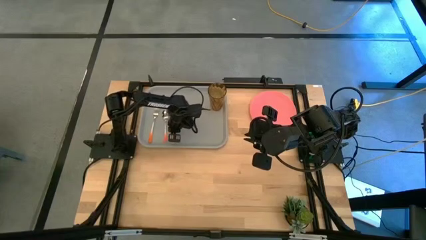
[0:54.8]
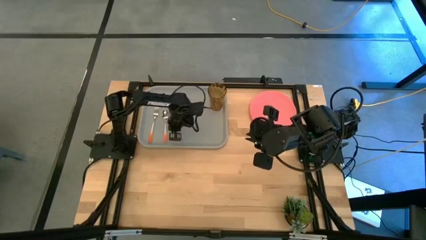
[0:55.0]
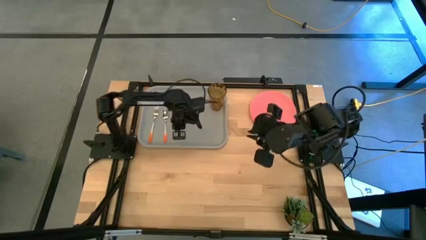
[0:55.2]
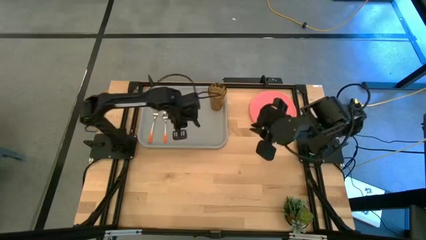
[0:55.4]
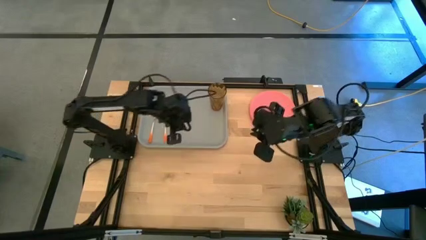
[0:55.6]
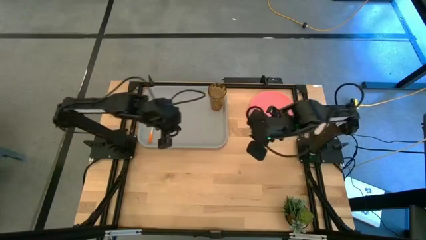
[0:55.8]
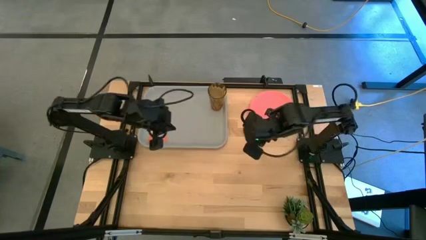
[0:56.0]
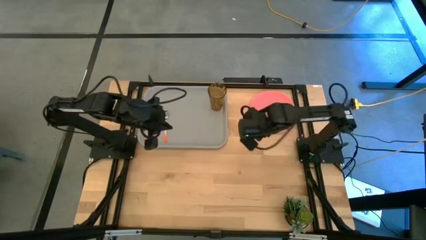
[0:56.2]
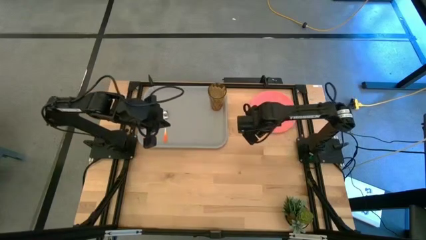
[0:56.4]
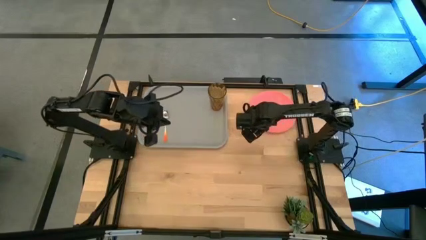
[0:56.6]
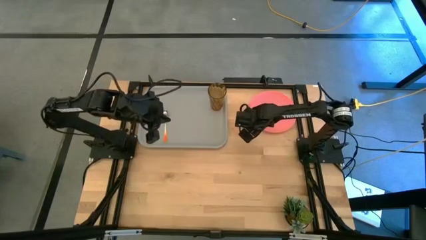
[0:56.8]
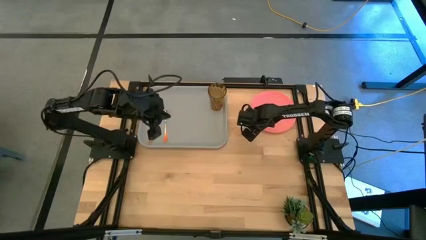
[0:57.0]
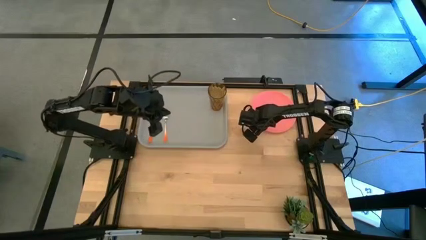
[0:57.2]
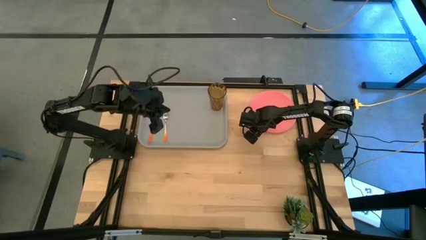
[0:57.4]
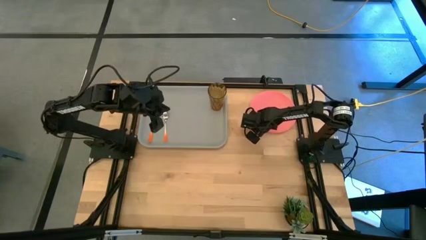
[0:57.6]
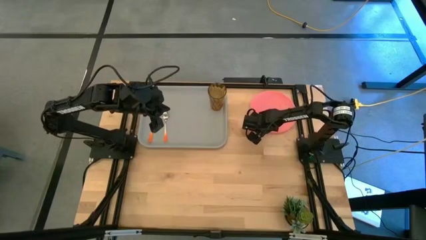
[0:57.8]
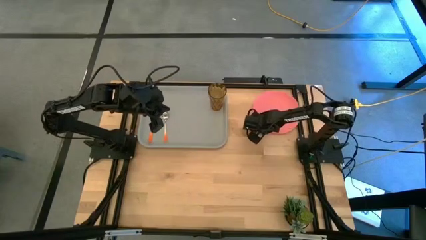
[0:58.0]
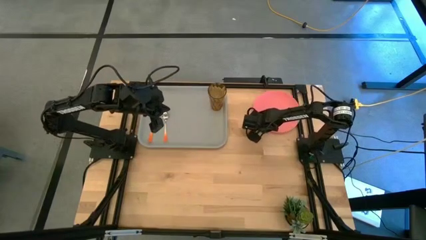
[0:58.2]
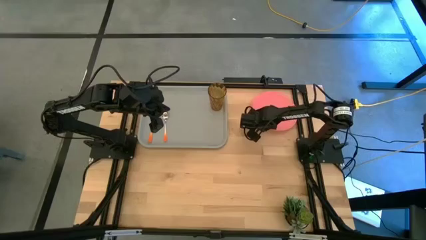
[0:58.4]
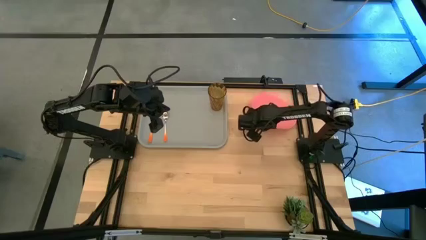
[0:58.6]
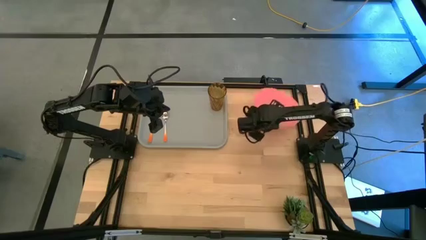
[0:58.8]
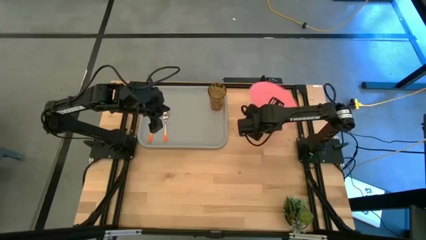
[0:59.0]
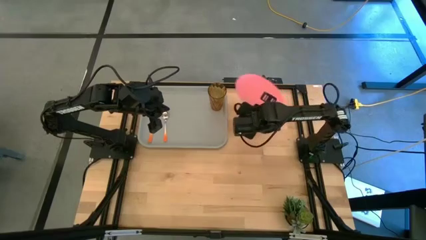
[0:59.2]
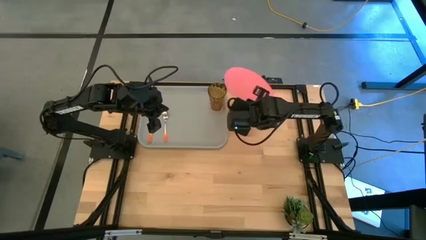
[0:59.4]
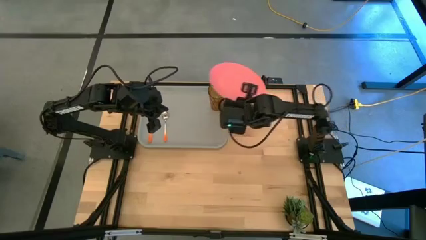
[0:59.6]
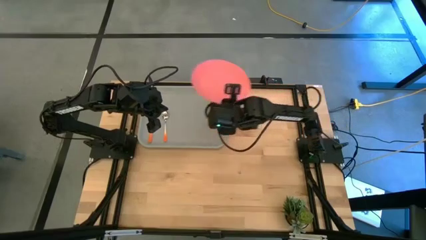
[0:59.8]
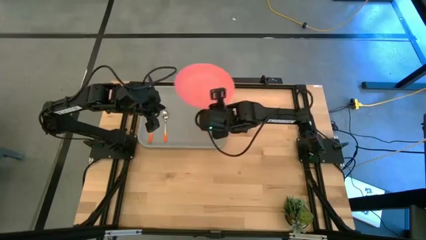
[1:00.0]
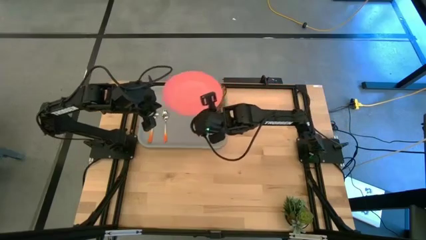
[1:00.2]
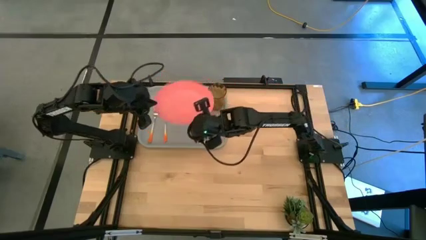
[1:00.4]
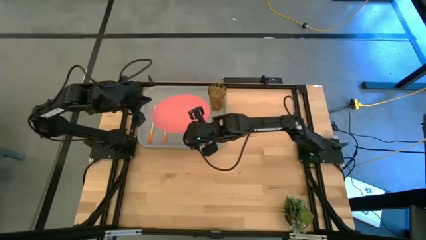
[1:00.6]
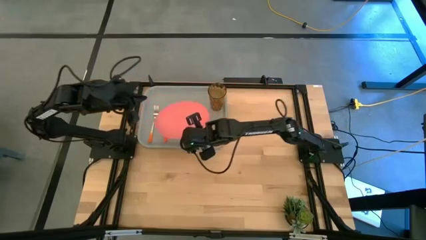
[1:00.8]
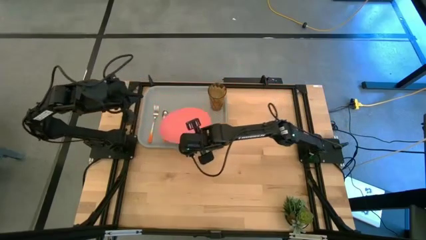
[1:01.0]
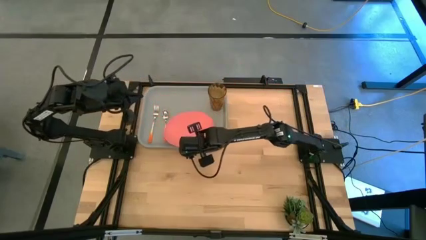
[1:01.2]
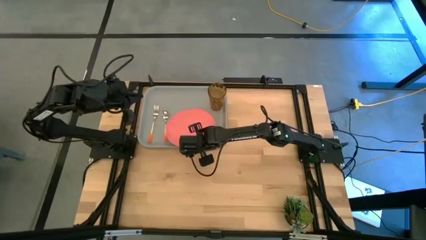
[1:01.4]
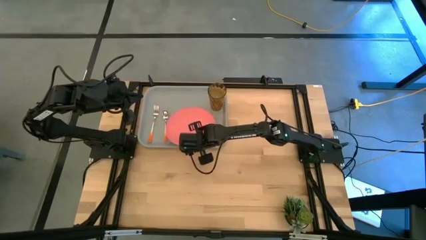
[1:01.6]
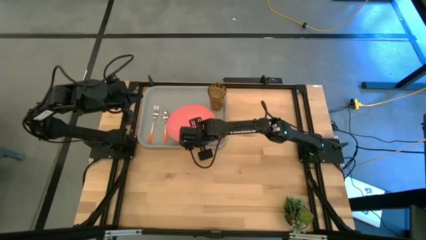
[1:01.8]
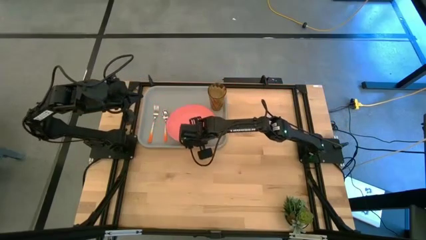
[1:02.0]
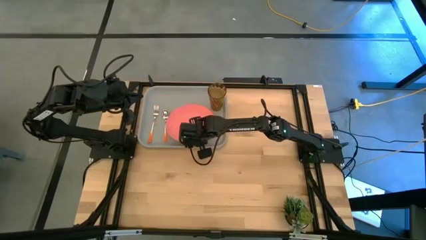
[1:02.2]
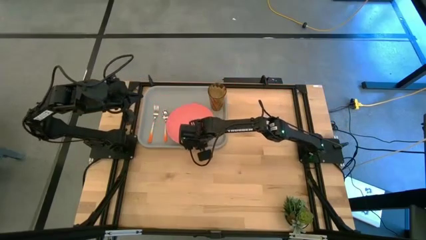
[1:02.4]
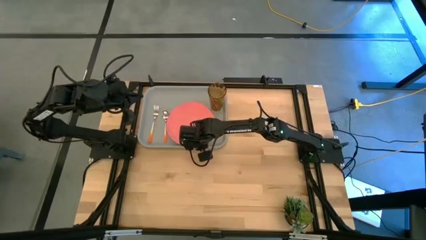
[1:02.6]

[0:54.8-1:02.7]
Task: Pick and place plate/cup/fork/spoon on tray
Put the pink plate to the right side of the orange spoon on the gray serving tray

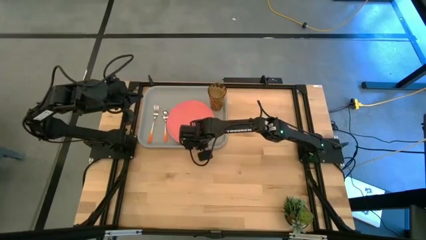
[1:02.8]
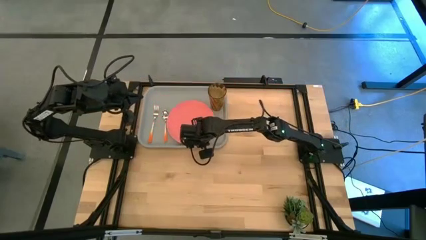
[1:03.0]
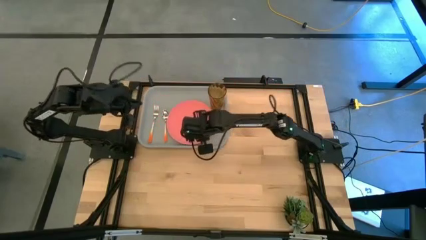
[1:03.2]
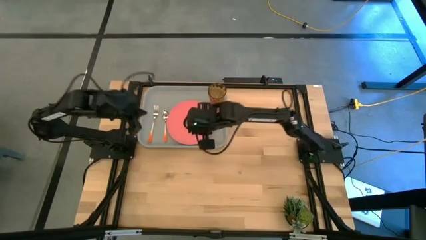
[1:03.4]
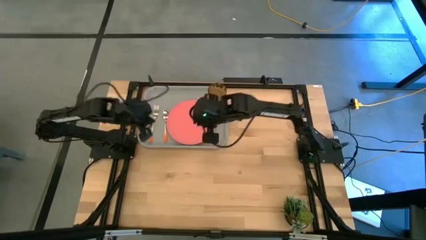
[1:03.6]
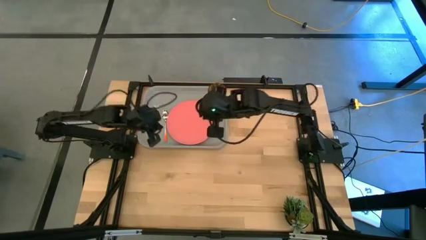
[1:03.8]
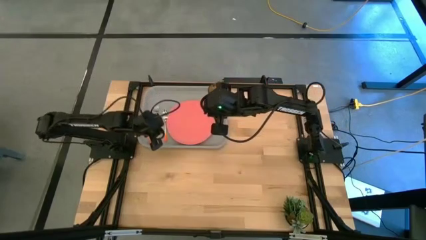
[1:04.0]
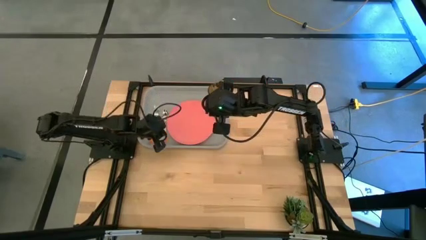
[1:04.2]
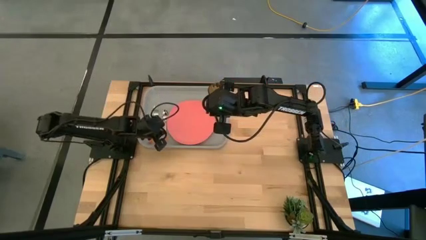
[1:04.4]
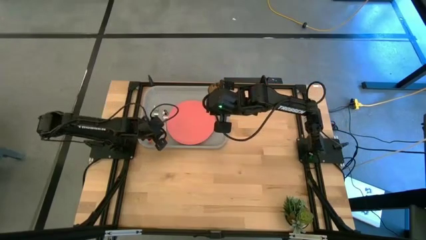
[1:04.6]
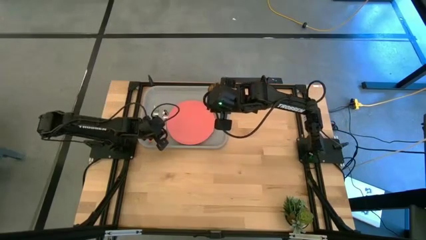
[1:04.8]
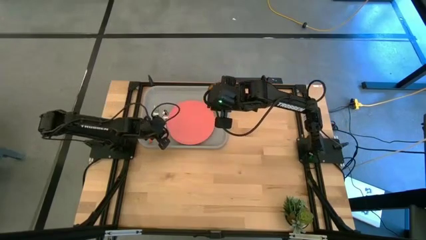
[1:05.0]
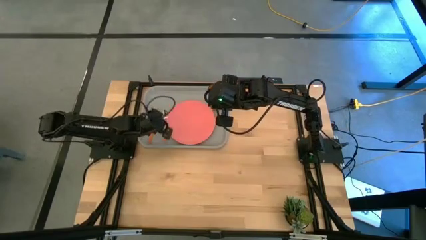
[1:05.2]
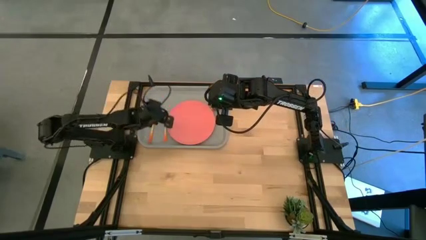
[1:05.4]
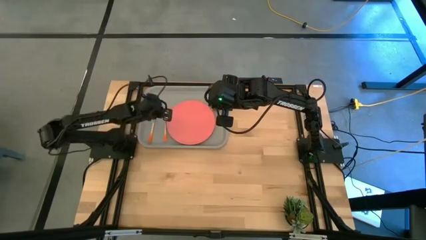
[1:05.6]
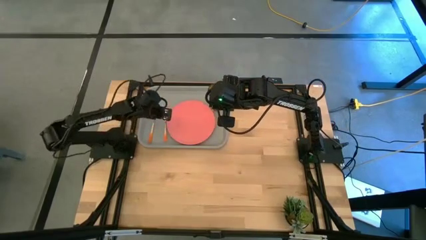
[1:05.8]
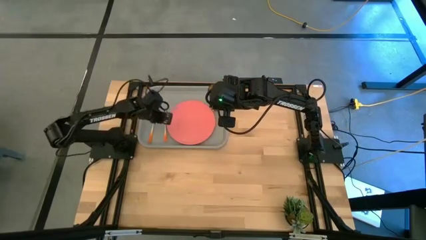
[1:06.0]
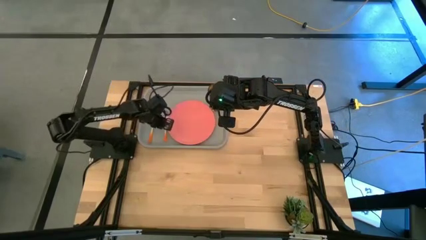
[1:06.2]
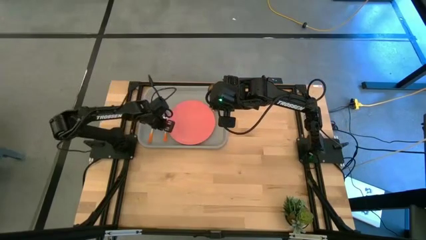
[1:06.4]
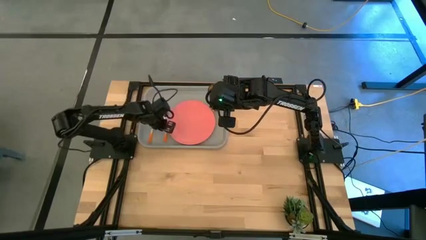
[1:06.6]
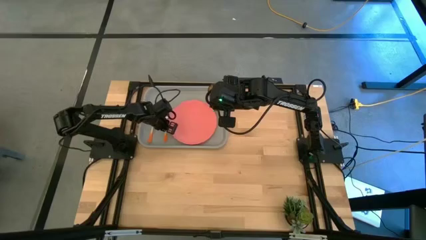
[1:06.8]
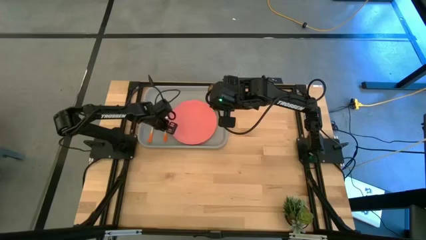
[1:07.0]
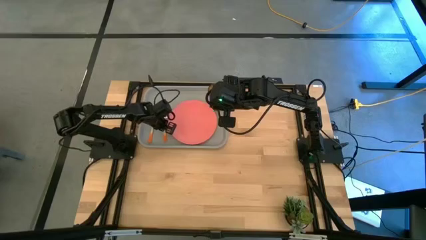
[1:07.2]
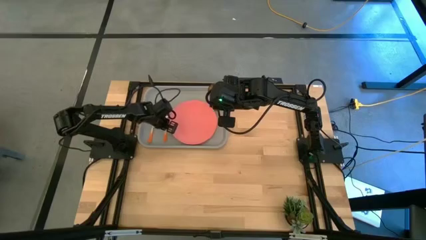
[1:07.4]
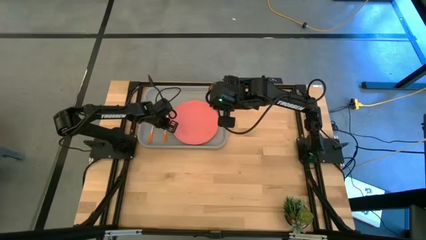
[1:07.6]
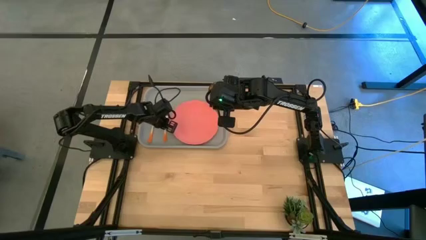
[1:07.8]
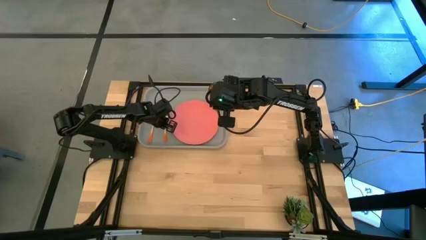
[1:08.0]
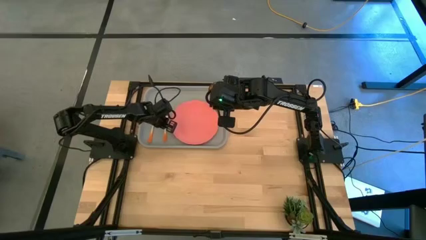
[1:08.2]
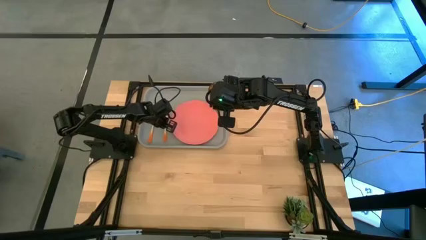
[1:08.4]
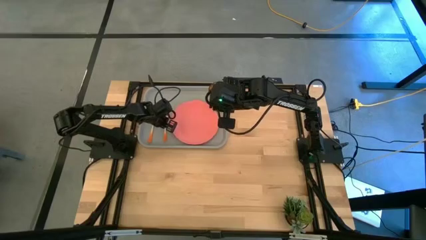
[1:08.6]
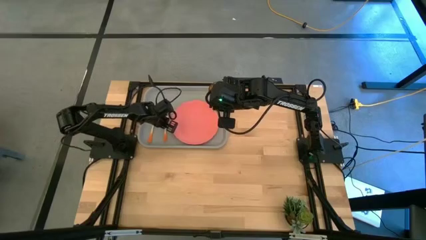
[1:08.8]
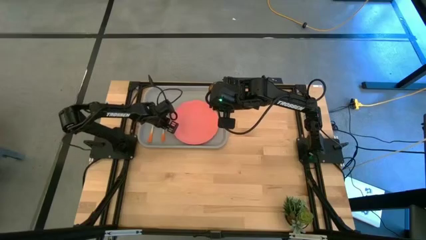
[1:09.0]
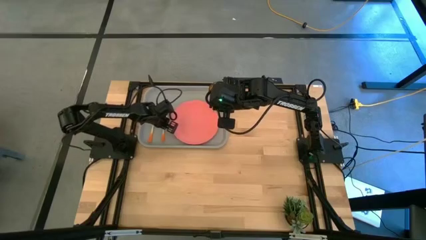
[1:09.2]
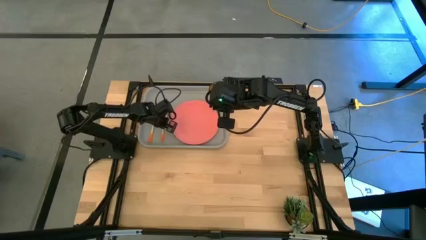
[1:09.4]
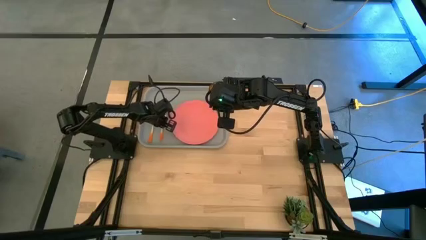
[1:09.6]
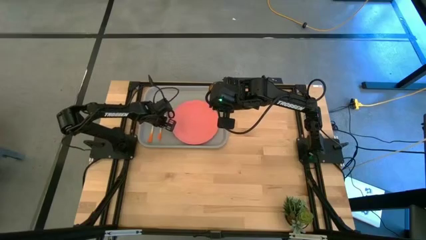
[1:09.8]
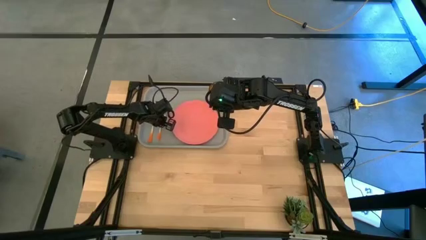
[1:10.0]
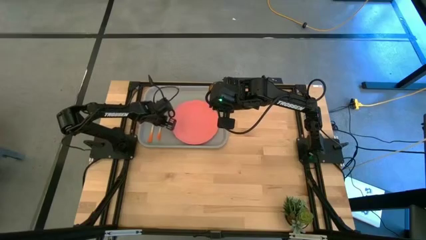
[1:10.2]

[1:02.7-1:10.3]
Adjust the orange fork

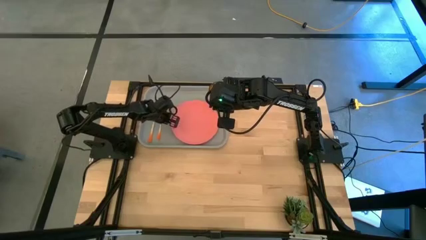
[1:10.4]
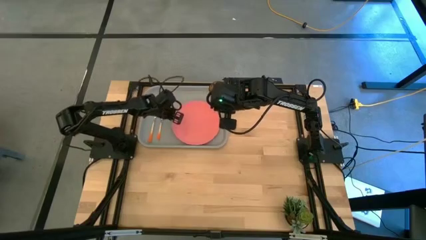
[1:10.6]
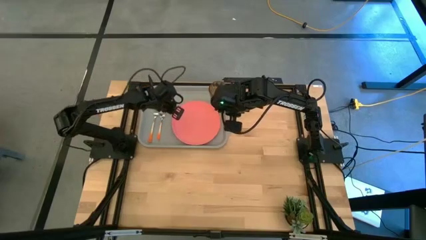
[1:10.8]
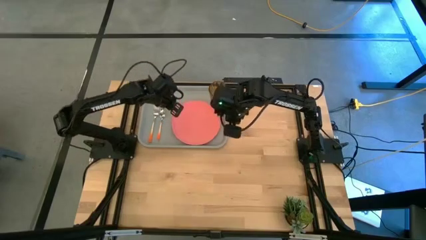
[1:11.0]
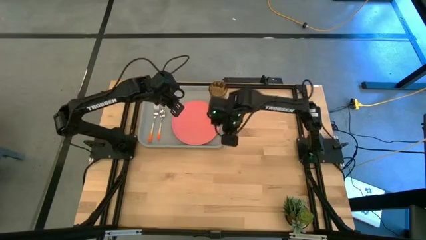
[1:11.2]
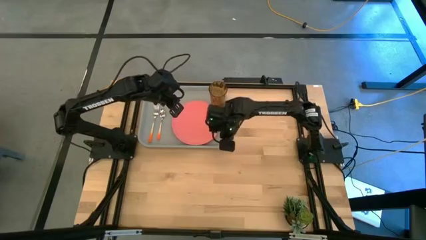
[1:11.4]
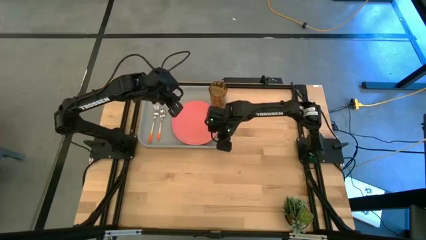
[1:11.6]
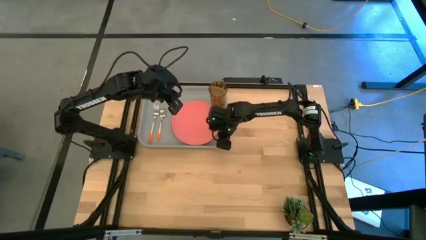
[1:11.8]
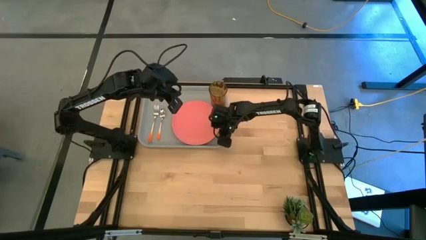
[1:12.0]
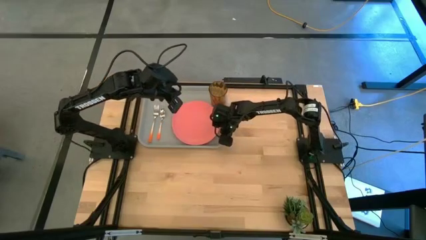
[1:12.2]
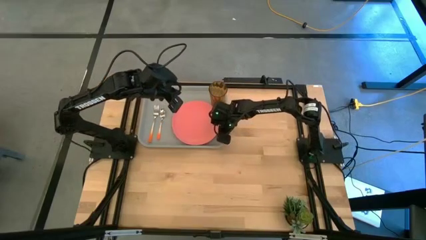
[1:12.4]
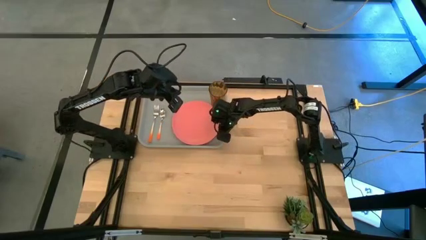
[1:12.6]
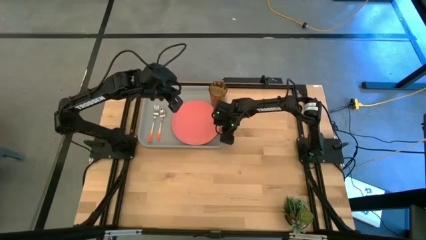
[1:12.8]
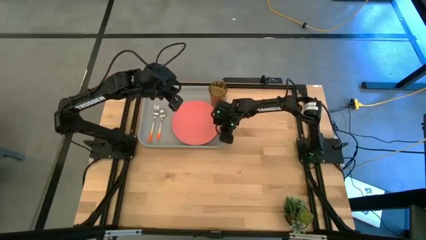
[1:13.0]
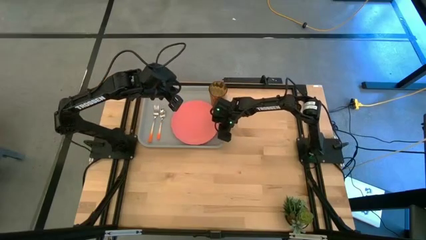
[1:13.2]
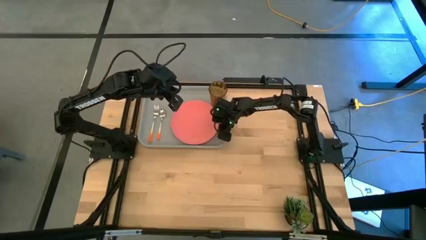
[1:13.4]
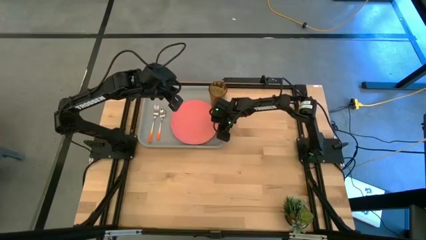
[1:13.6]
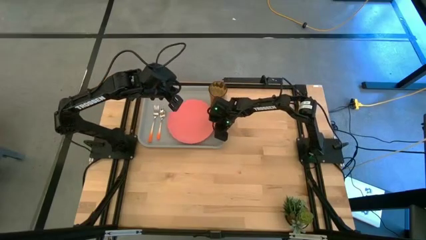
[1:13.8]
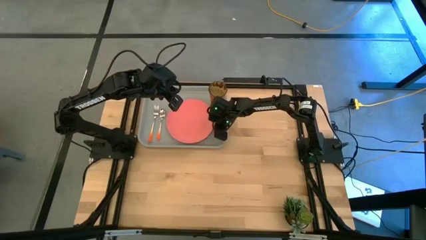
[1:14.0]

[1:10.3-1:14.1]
Adjust the pink plate
